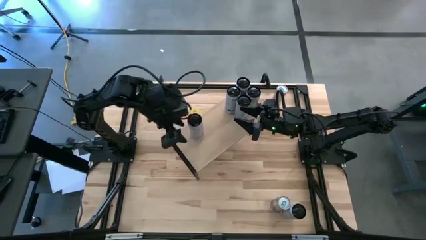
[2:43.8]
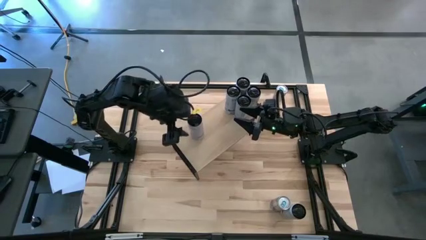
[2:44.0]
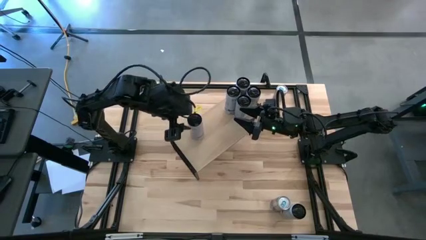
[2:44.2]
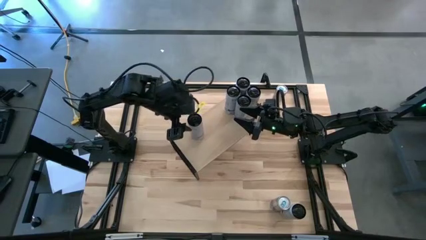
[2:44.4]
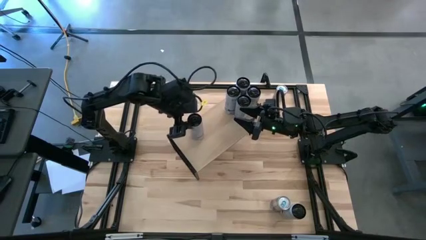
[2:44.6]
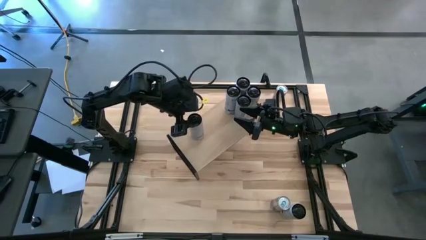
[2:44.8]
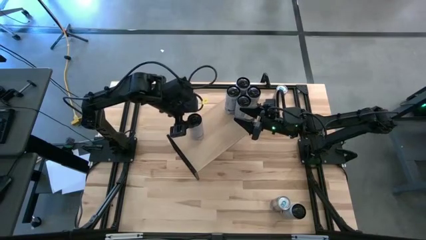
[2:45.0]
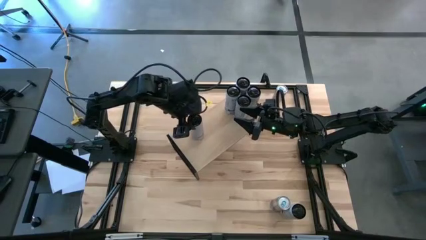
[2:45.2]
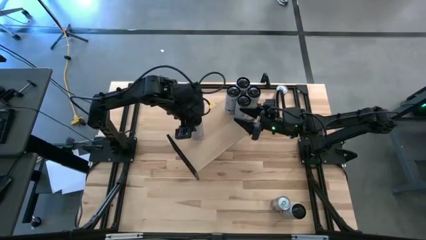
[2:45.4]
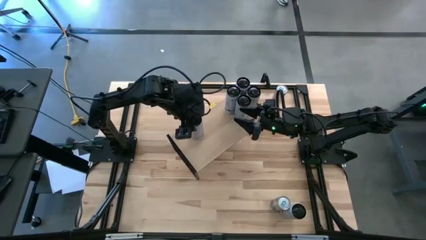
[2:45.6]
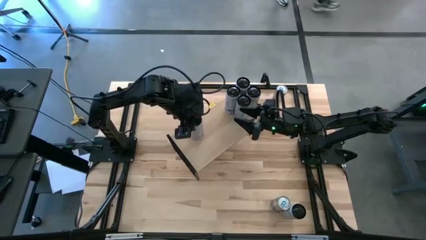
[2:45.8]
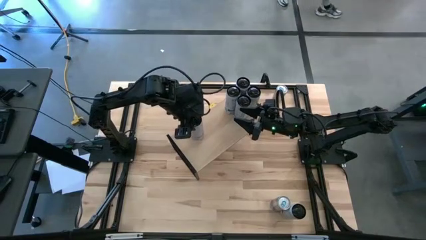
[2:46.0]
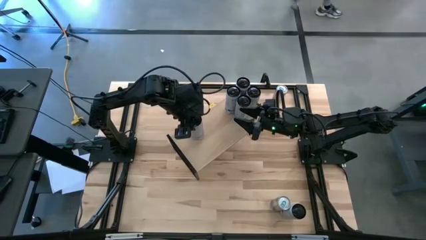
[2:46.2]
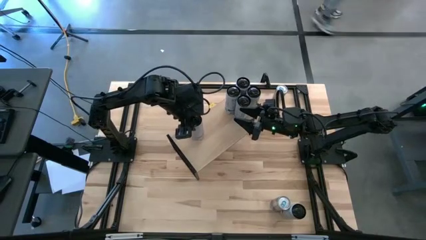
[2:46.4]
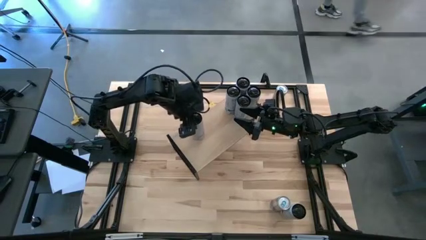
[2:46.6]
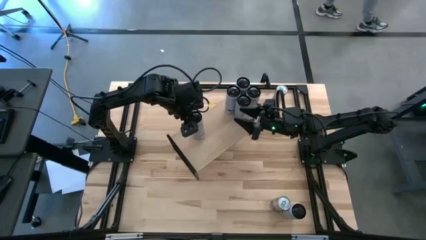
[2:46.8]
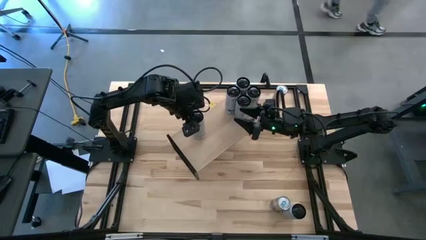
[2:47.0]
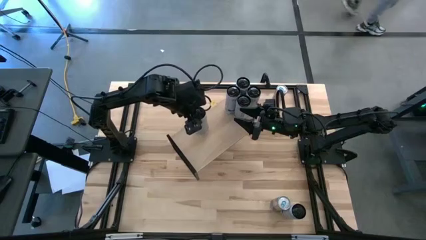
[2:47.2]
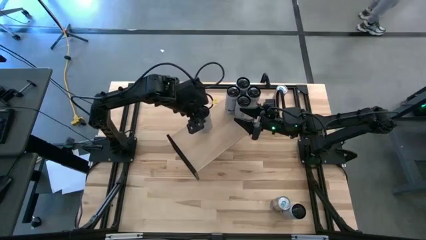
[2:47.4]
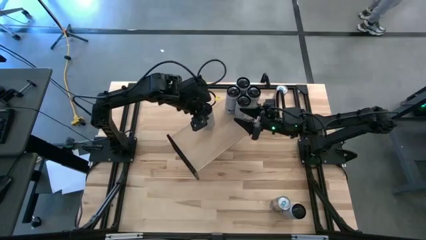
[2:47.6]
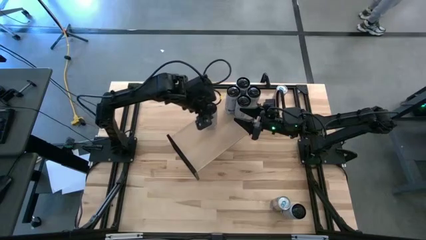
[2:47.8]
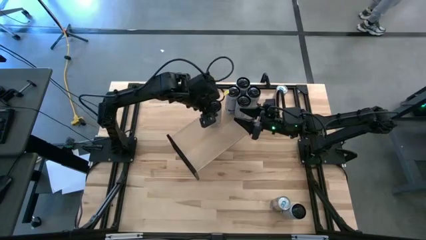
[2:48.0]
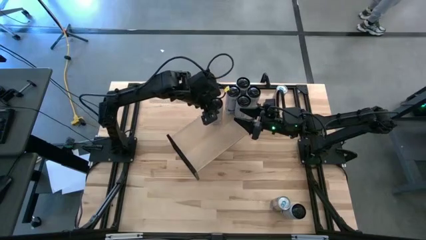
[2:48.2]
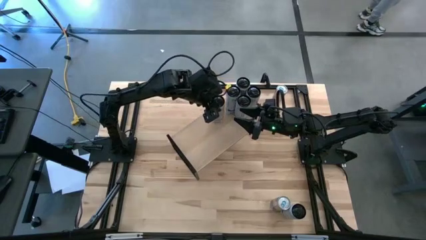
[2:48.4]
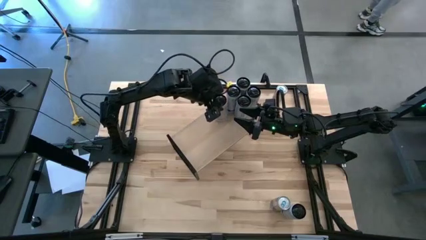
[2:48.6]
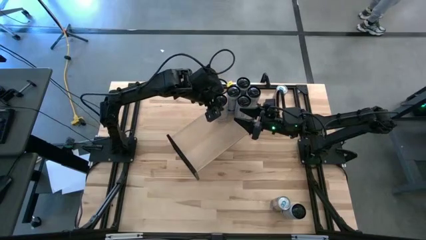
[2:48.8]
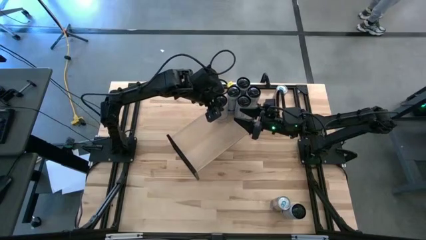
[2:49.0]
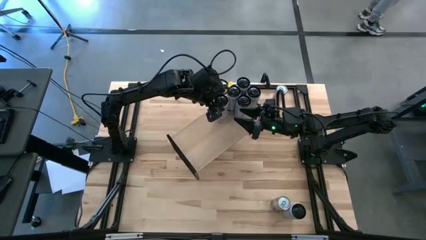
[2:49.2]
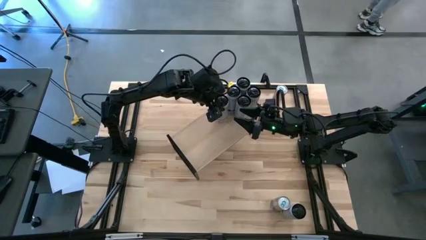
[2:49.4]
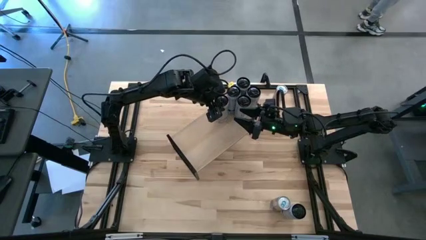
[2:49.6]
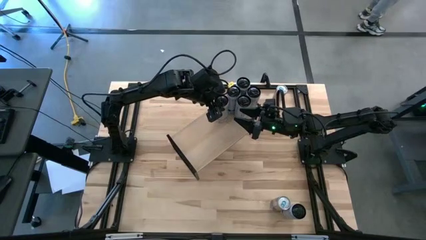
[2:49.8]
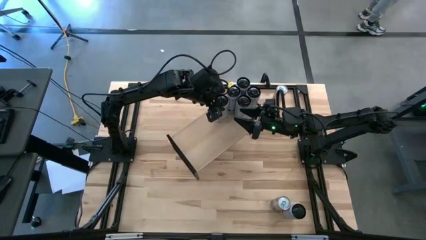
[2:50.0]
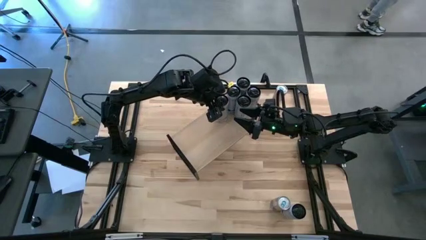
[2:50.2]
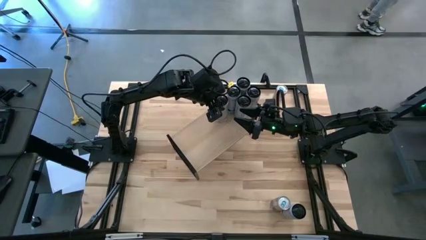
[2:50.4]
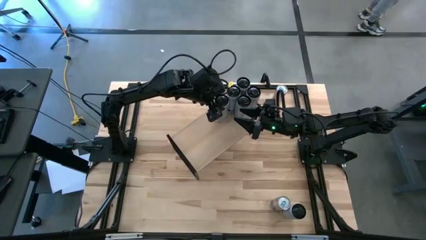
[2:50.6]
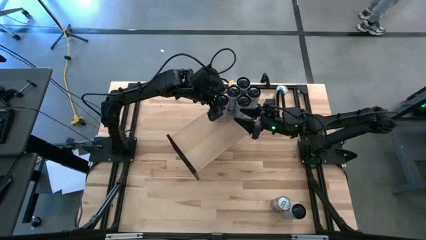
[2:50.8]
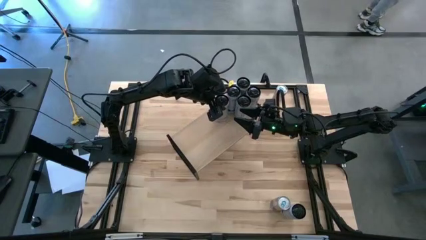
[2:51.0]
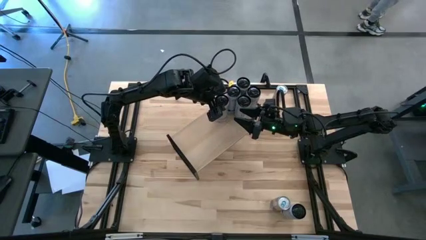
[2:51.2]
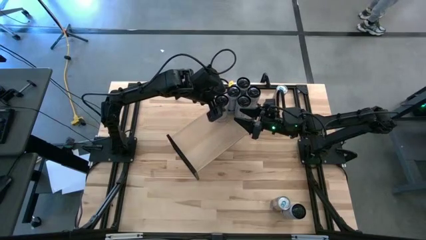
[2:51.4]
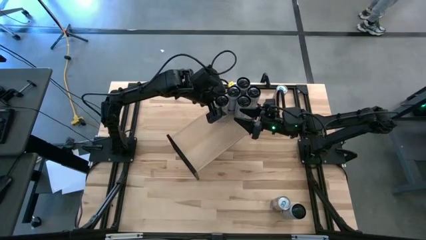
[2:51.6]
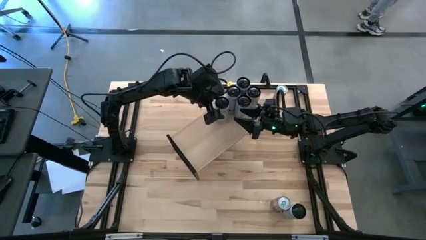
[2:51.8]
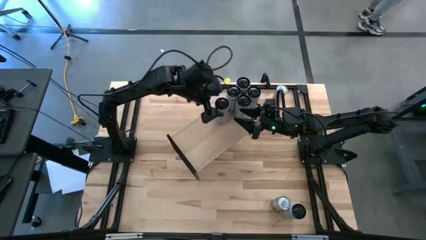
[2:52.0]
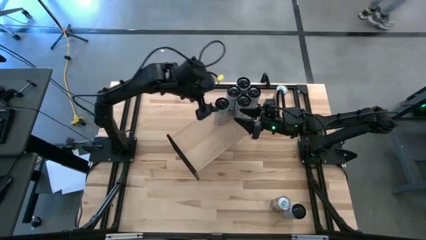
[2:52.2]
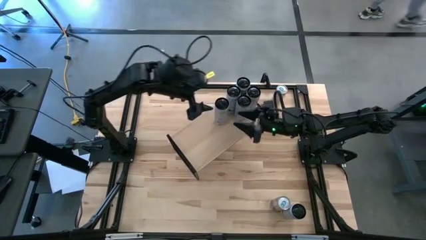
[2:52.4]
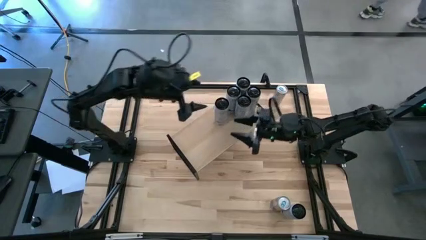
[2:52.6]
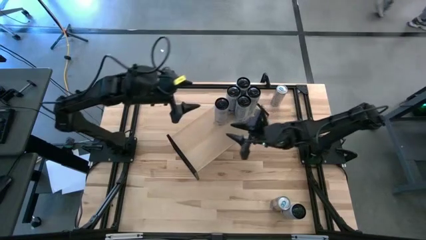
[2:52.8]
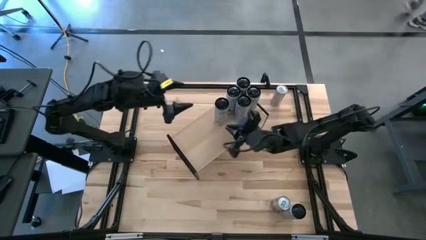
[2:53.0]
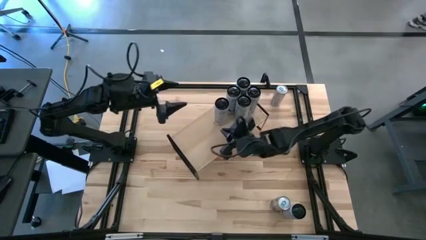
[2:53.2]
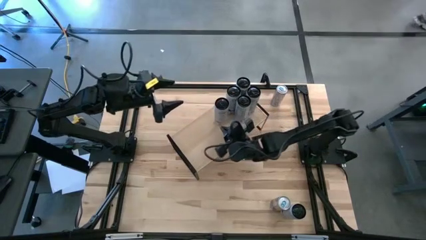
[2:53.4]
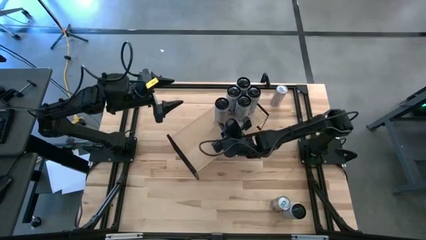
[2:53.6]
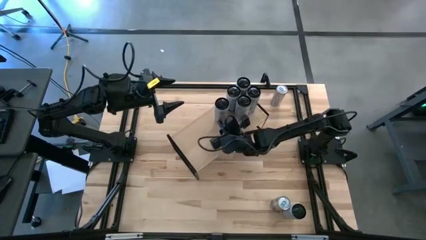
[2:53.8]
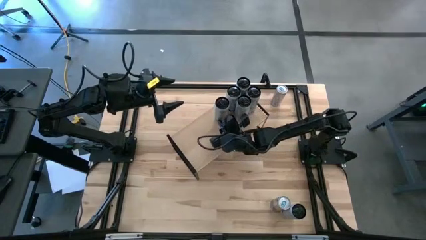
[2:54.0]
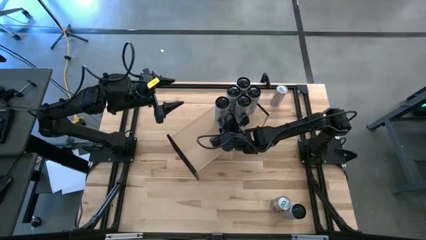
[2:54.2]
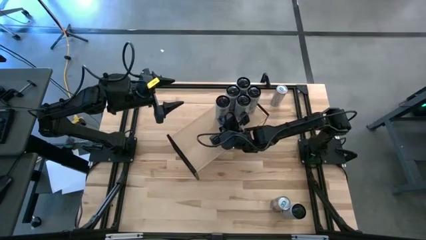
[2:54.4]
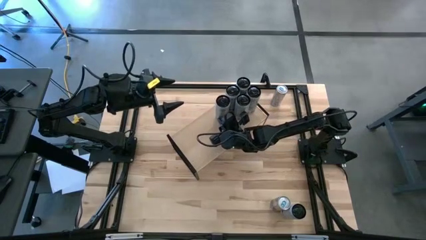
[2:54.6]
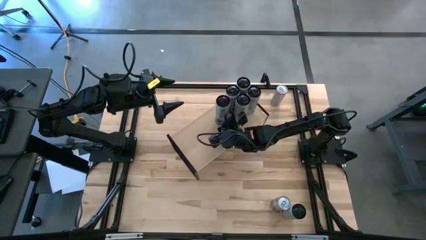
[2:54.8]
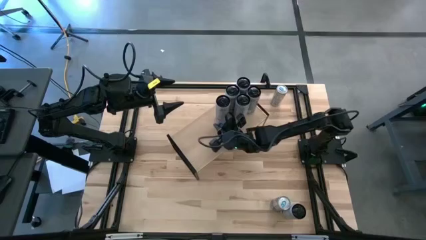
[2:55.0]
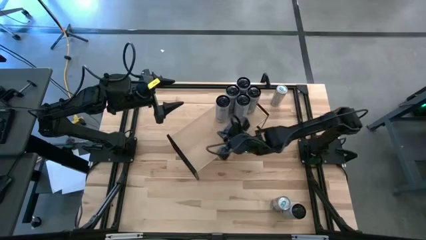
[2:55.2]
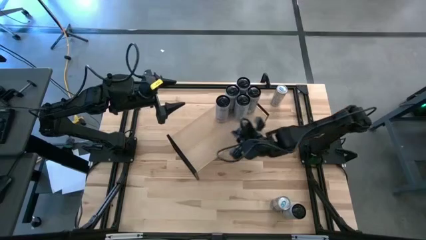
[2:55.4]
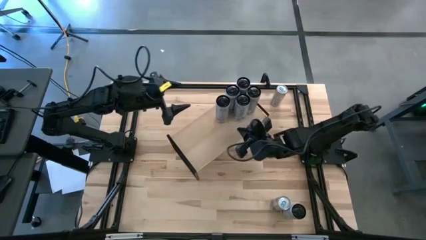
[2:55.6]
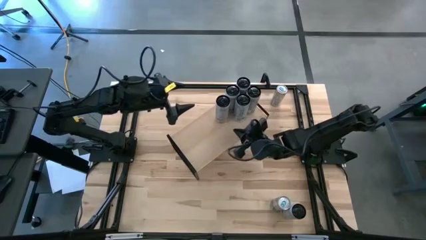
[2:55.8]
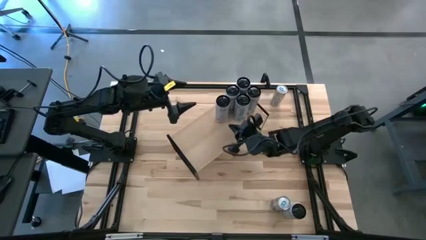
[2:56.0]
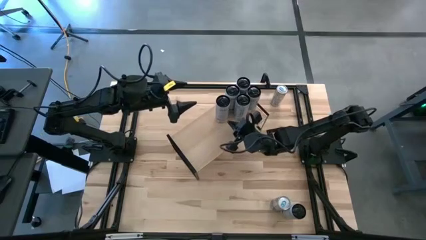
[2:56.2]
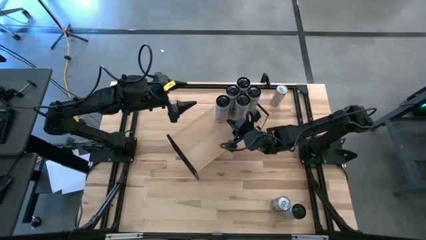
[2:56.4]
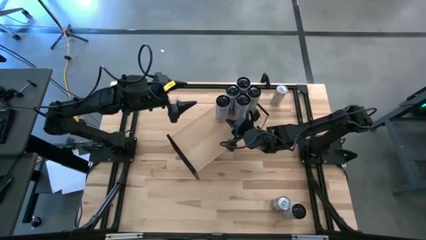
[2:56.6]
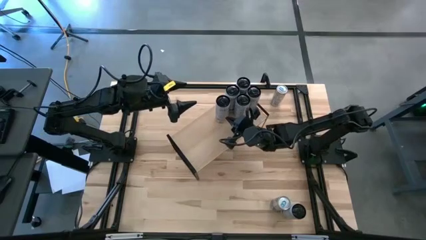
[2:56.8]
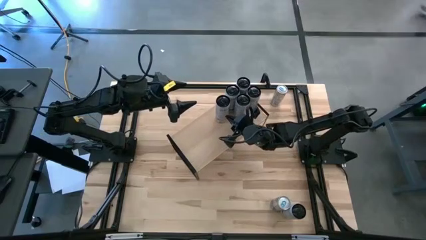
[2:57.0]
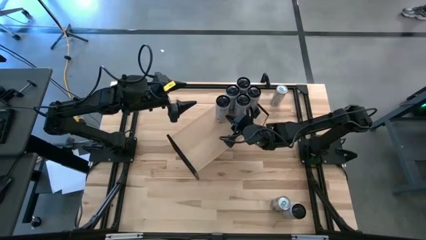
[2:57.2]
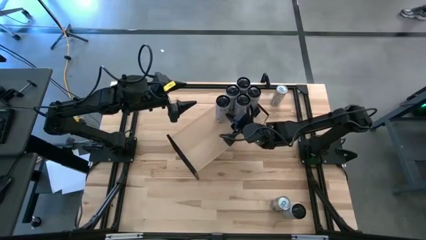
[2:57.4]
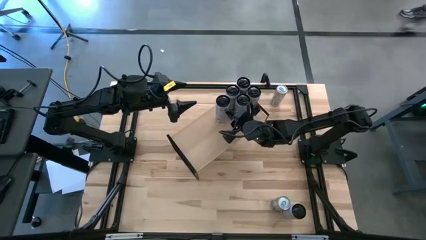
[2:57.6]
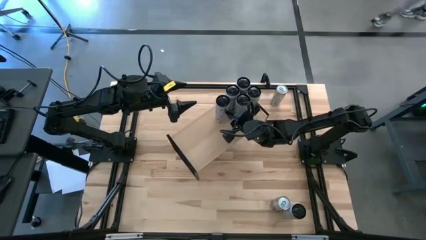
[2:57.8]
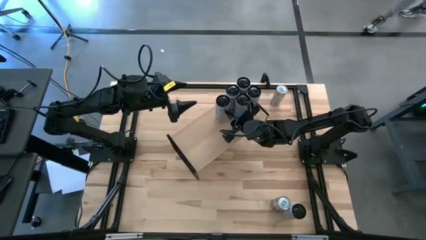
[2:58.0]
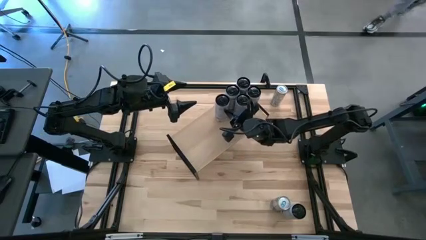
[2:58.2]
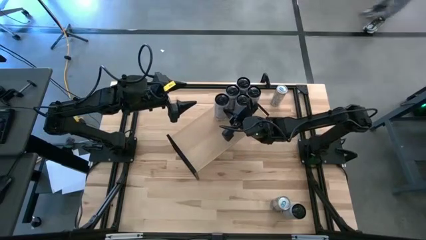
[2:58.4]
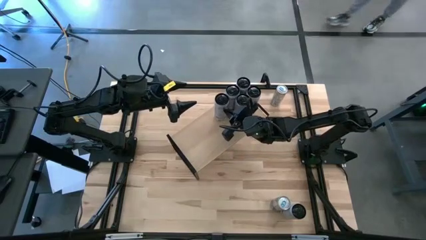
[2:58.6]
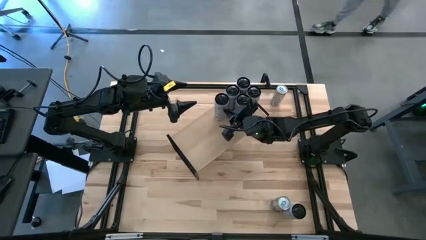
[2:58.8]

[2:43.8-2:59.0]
Task: Place canned beverage on shelf
Put the top white-pink soda can on the shelf
